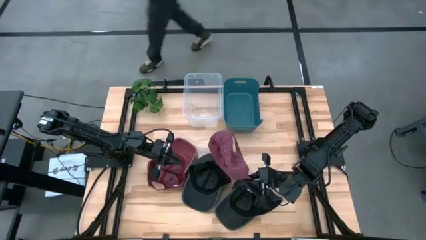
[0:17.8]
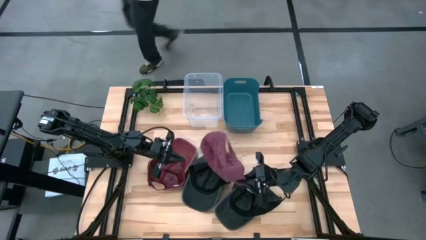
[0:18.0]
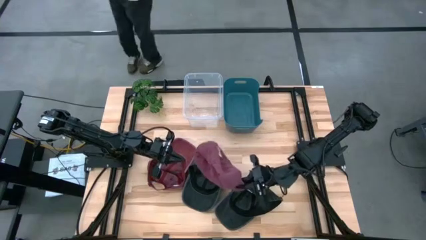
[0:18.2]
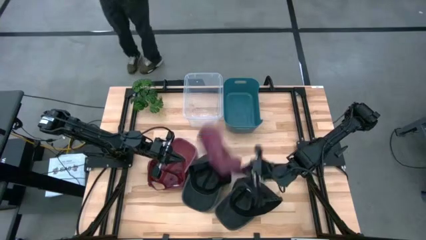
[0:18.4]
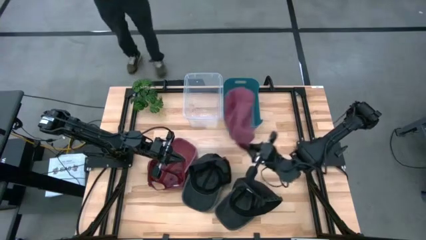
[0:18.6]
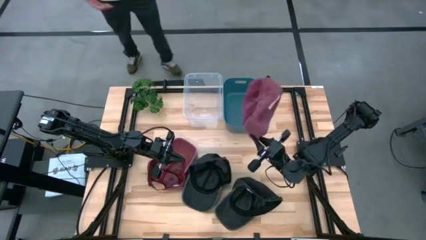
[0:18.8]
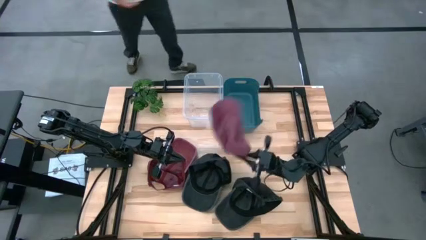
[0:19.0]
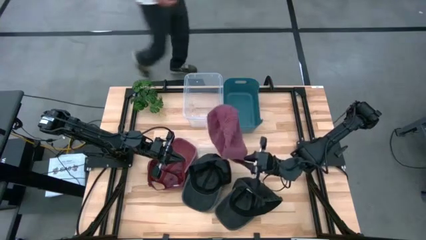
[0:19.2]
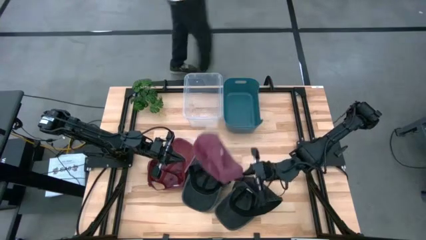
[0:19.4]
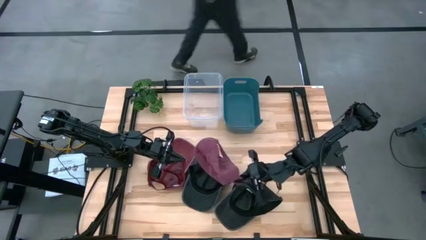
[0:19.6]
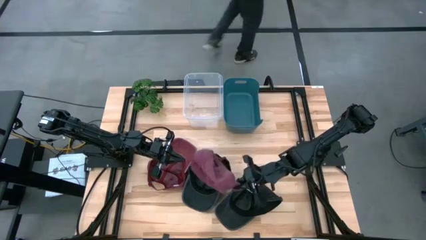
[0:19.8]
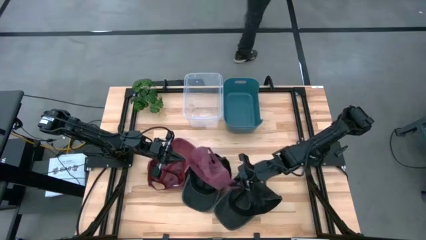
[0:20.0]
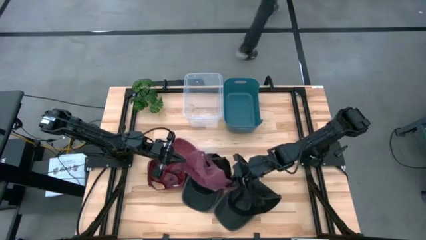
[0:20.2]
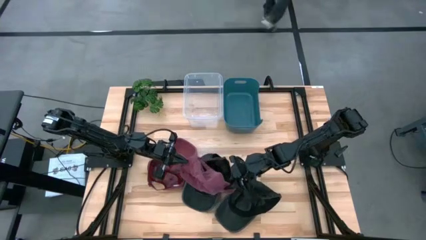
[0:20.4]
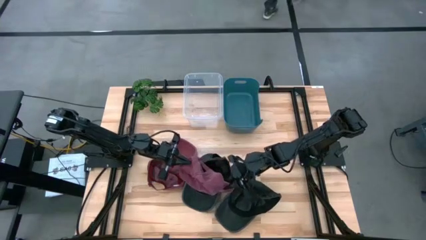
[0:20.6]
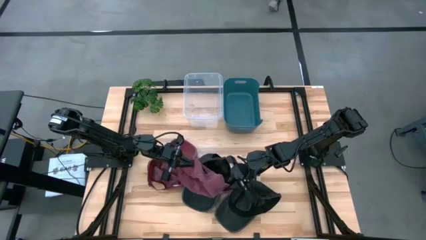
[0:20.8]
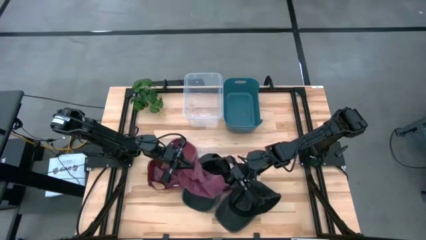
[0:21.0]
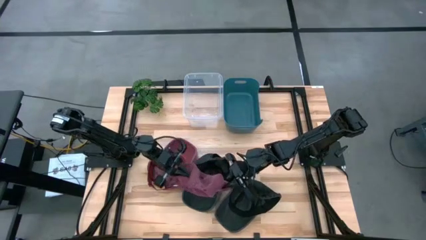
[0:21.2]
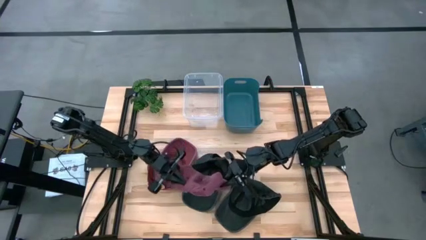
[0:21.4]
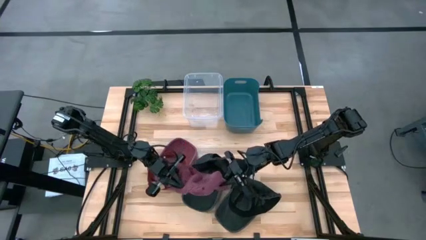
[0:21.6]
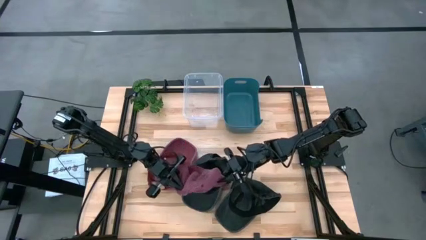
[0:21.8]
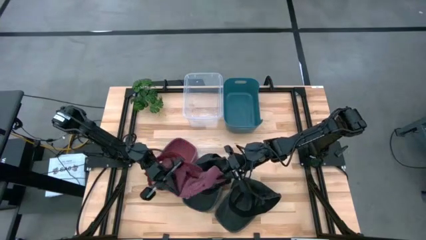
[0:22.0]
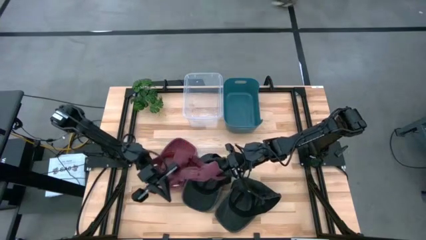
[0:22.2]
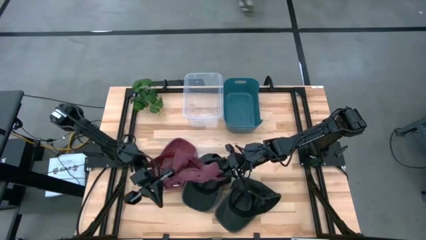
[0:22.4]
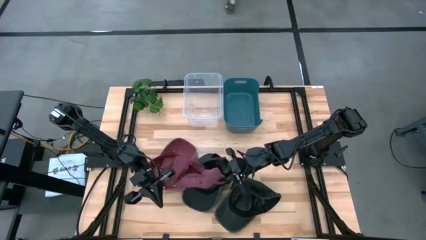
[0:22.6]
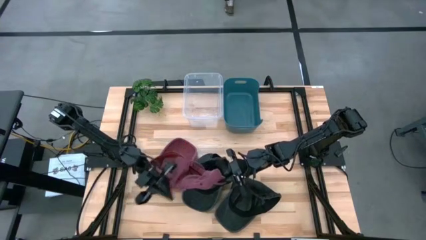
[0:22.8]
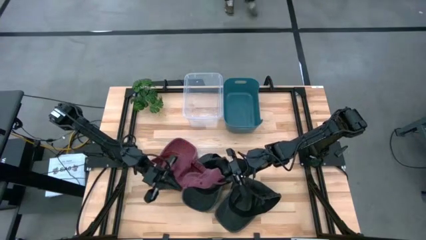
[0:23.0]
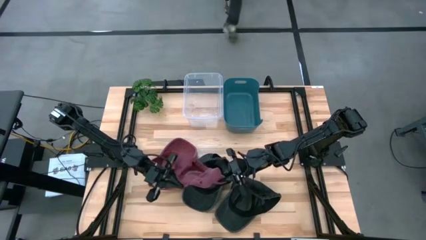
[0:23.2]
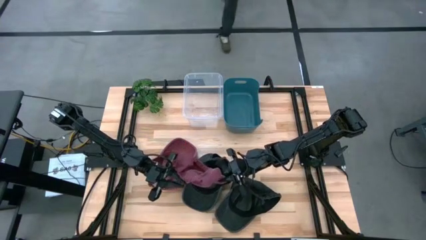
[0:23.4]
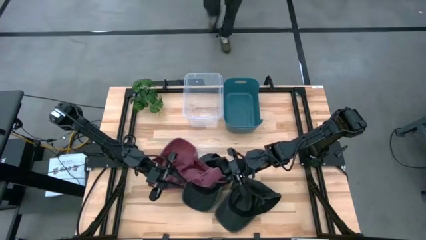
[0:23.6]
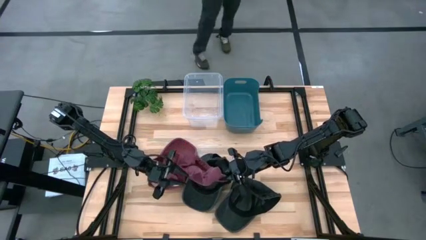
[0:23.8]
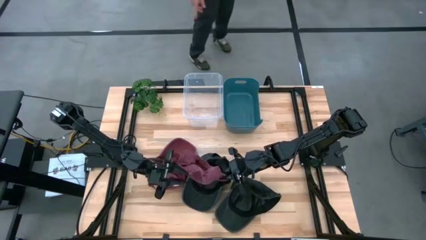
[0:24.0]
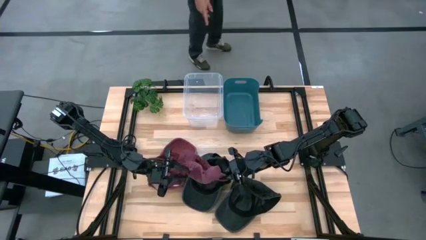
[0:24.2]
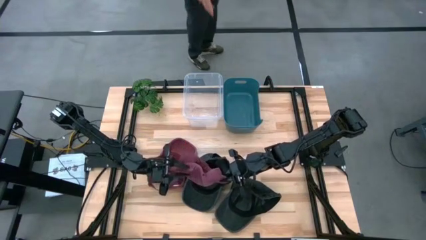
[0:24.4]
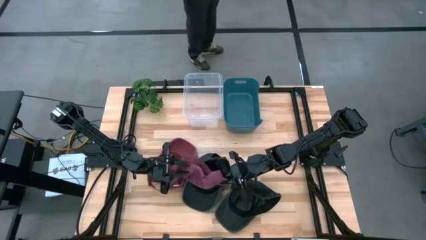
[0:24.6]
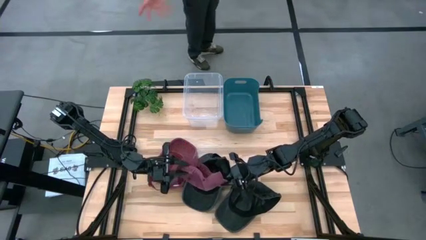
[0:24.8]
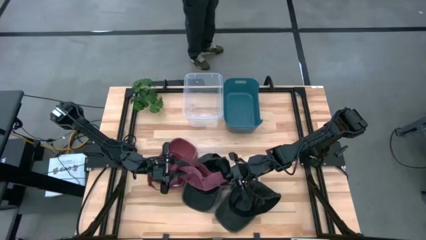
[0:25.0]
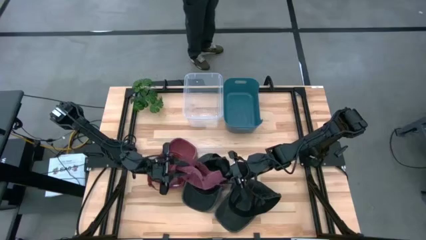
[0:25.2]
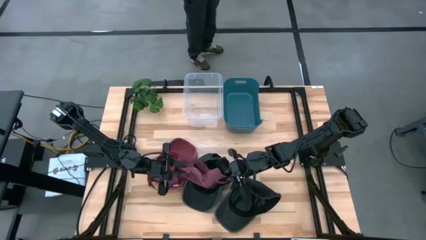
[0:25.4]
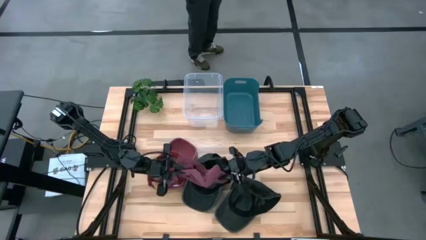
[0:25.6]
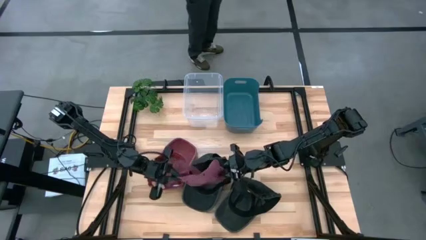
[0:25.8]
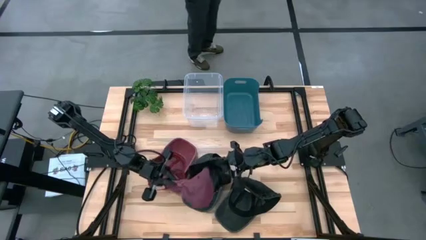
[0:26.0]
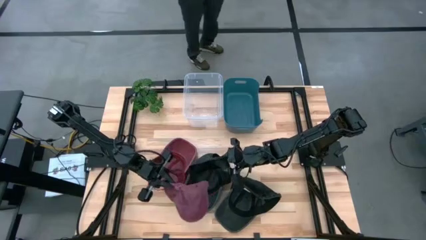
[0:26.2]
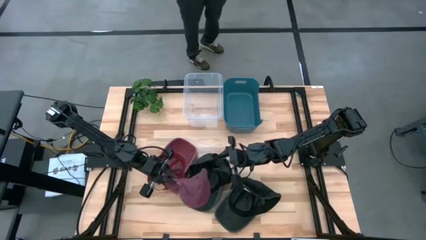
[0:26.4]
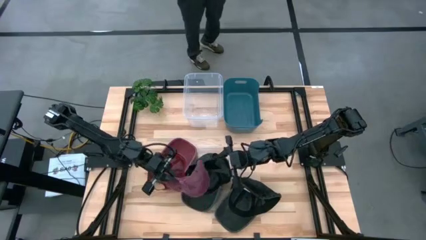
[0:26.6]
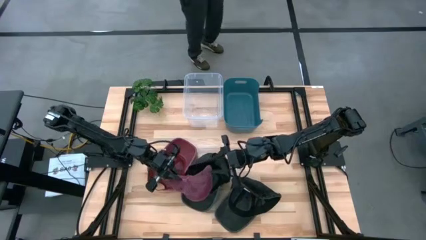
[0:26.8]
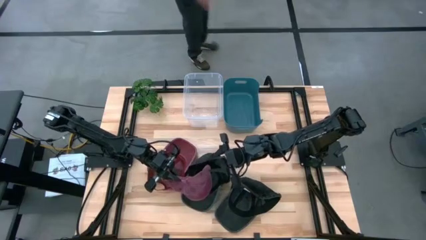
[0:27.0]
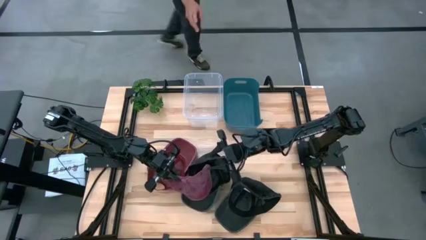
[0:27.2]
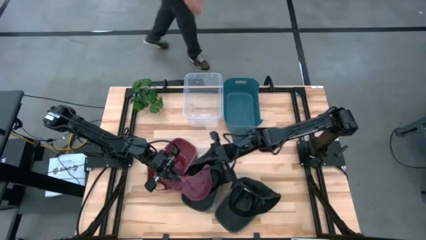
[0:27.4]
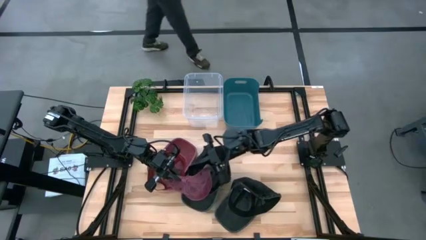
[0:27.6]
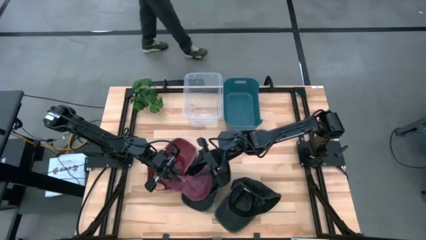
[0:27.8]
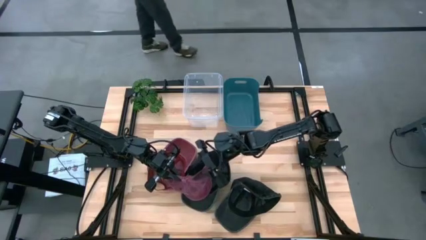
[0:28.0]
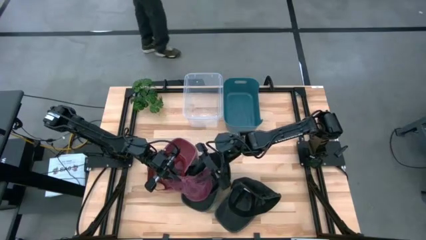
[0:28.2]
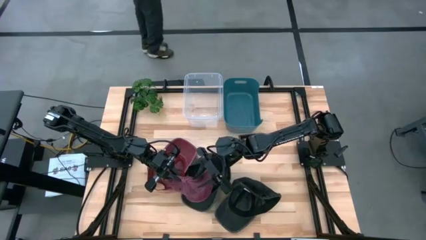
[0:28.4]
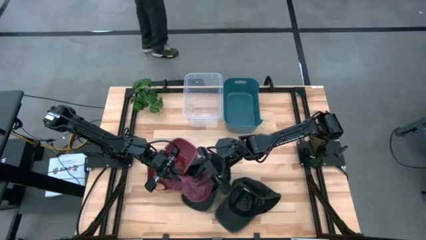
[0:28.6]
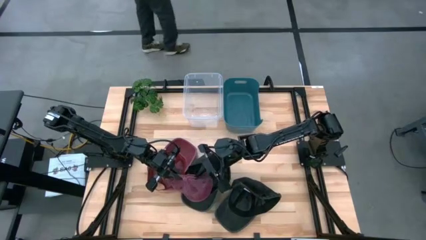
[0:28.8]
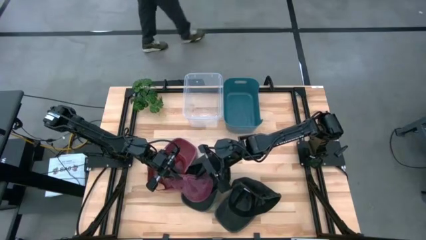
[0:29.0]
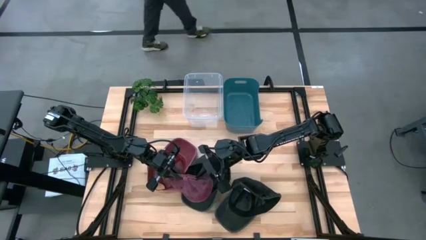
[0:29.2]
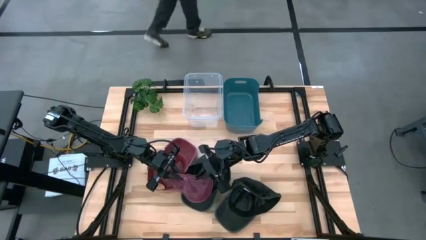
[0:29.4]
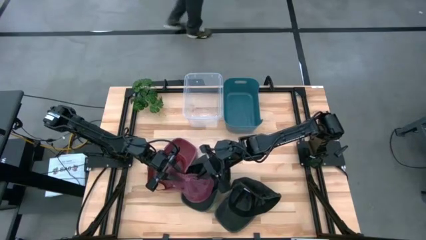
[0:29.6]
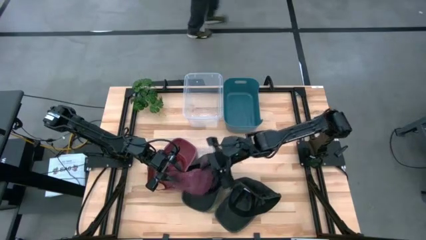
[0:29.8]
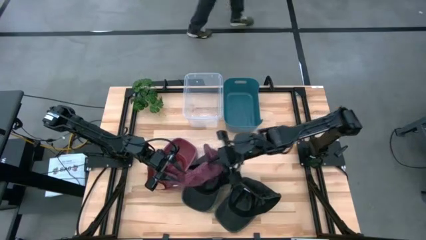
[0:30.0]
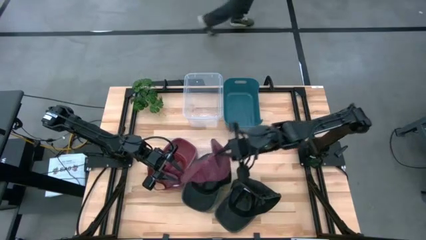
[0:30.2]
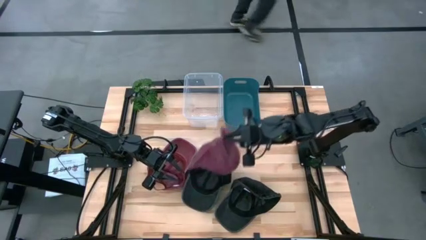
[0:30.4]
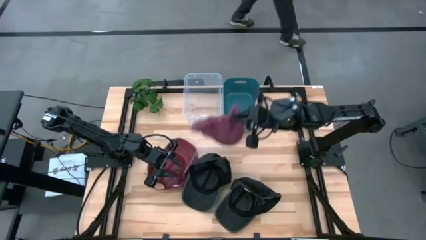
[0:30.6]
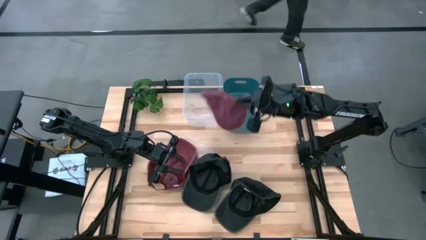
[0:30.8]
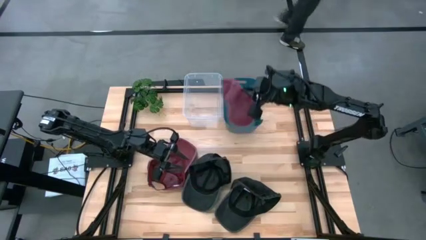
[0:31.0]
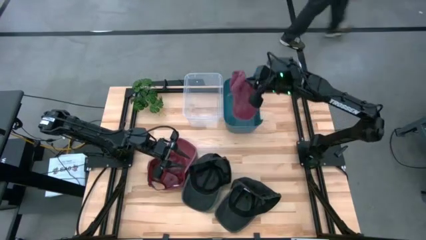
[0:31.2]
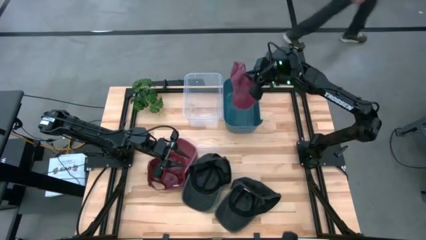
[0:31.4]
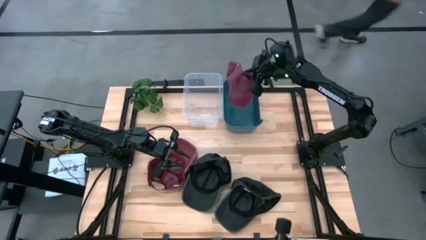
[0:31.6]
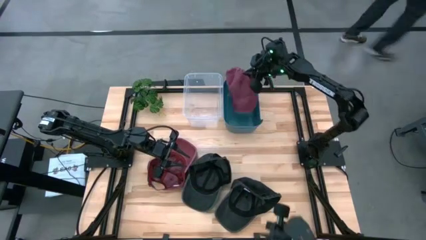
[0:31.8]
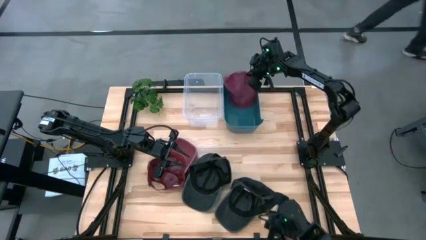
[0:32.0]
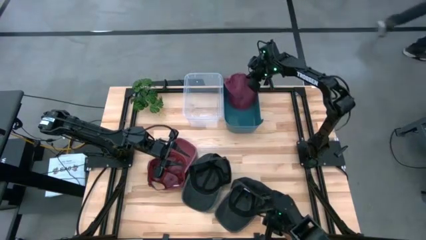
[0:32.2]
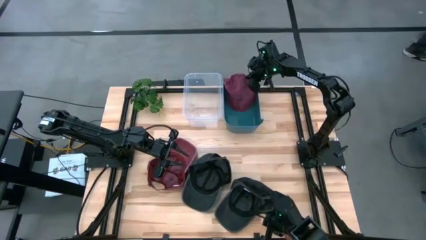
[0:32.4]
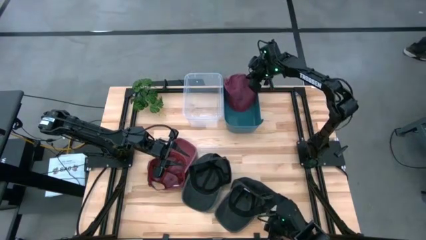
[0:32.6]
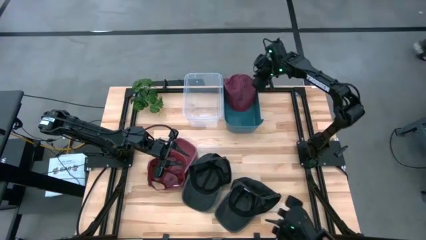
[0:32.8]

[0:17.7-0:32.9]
Task: Pick & Place hat
Put the right red cap into the blue bin
